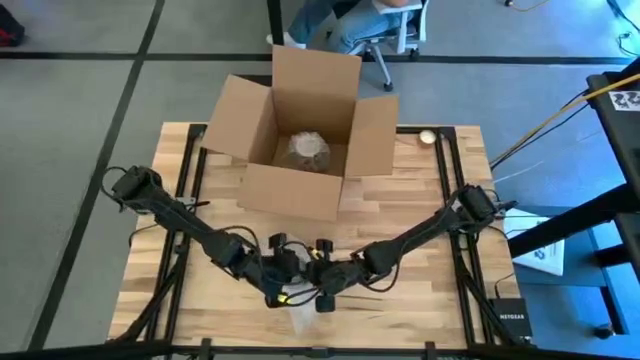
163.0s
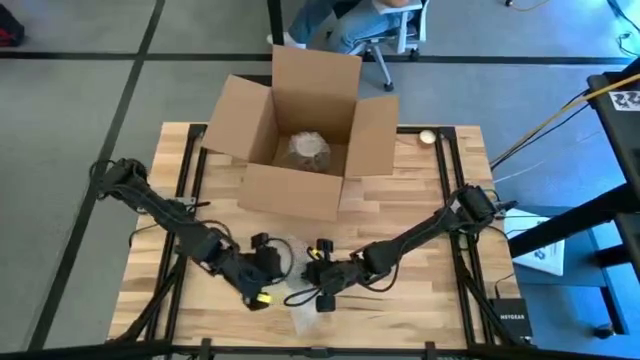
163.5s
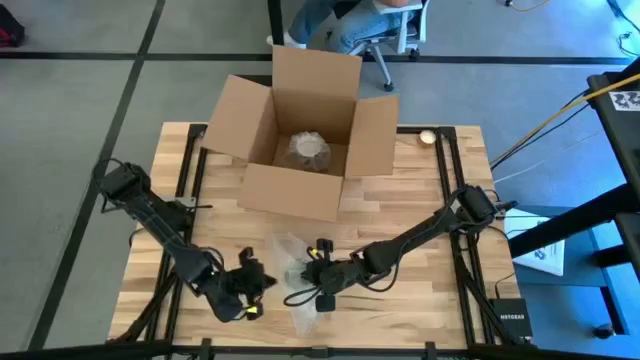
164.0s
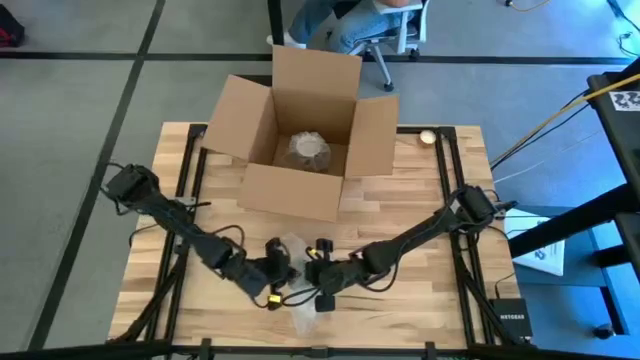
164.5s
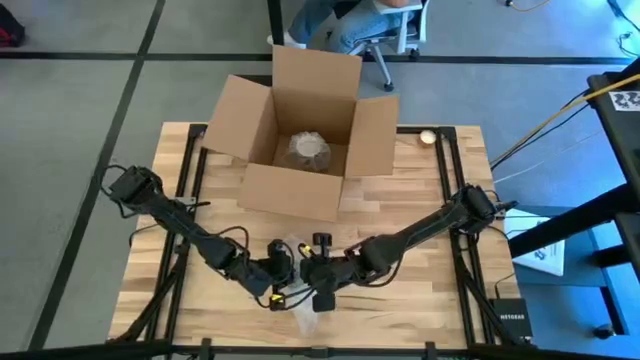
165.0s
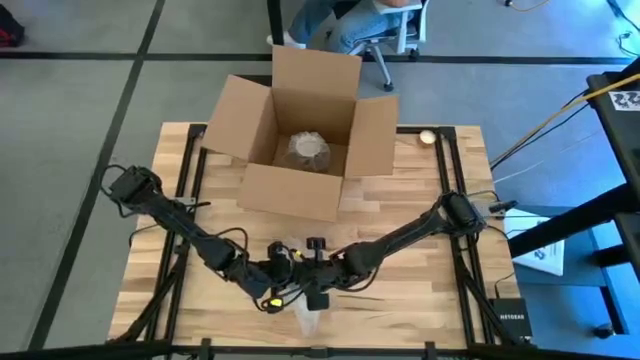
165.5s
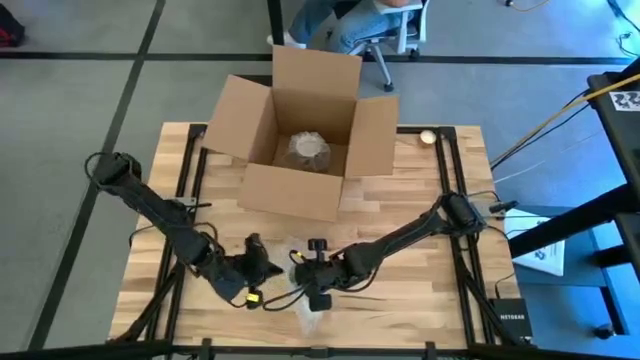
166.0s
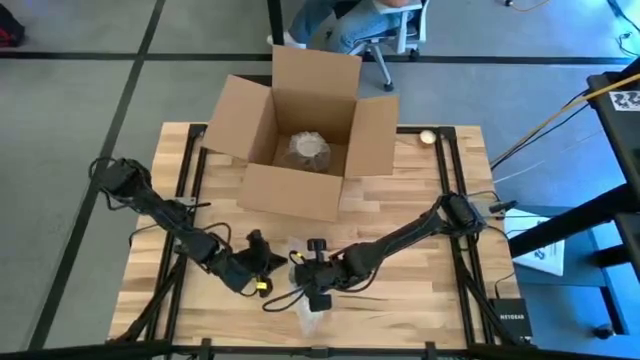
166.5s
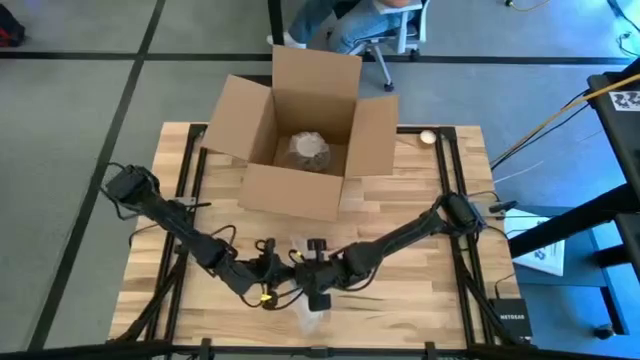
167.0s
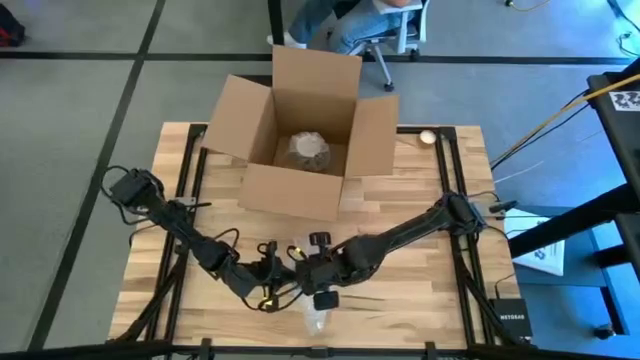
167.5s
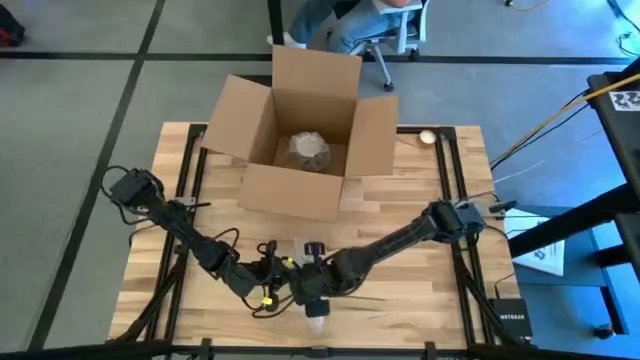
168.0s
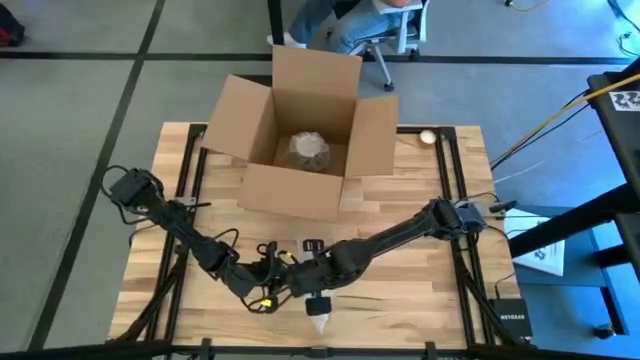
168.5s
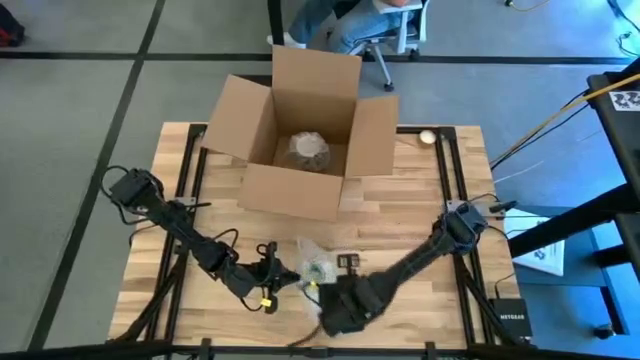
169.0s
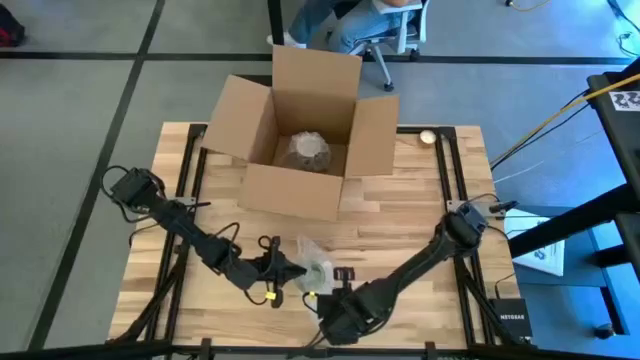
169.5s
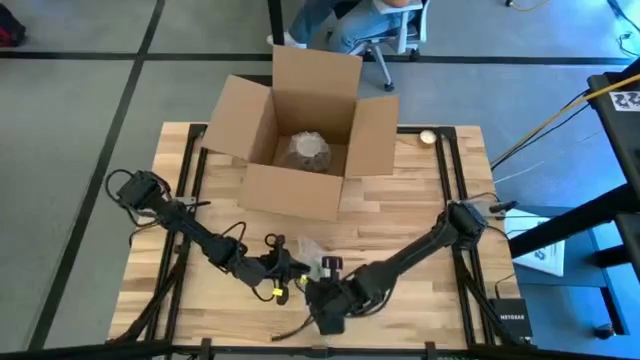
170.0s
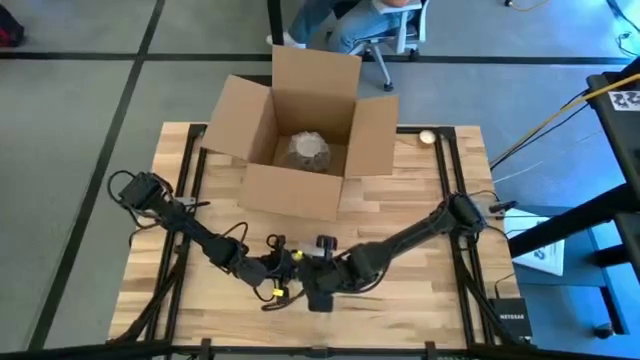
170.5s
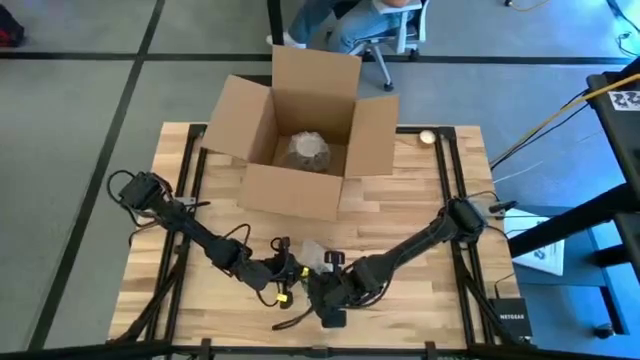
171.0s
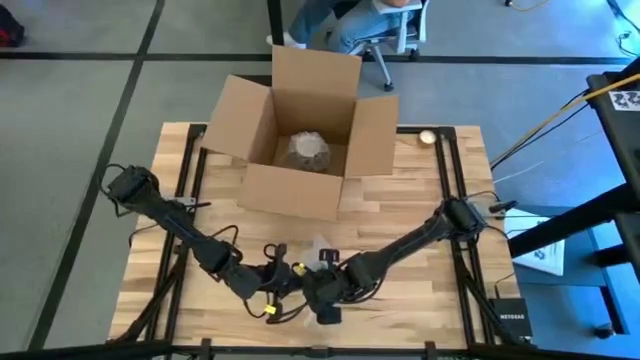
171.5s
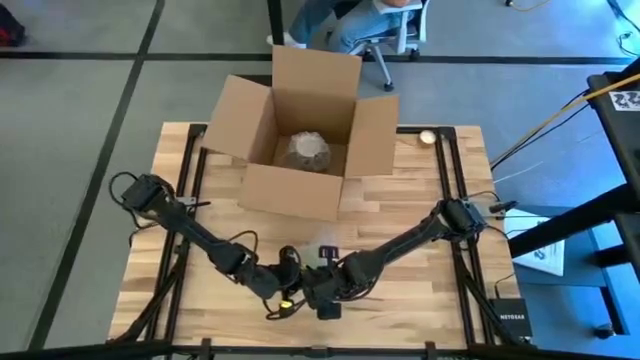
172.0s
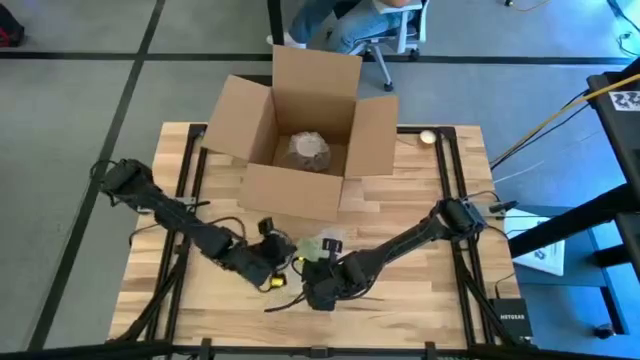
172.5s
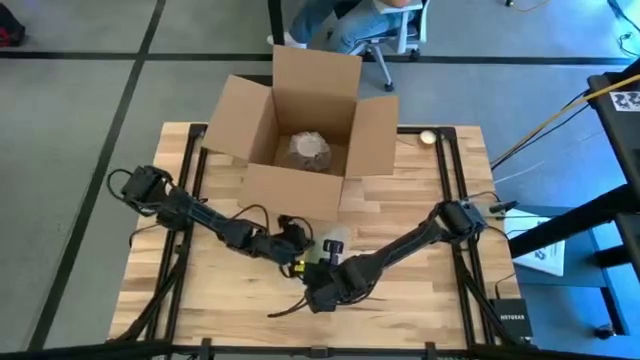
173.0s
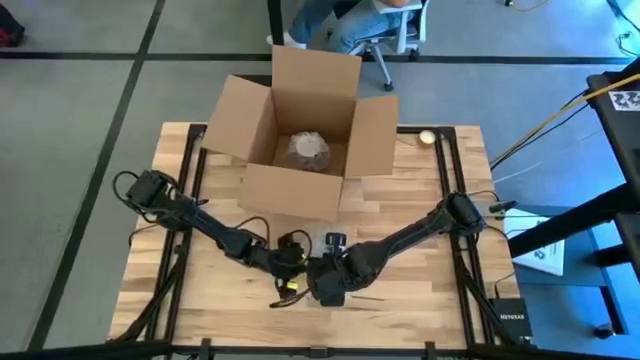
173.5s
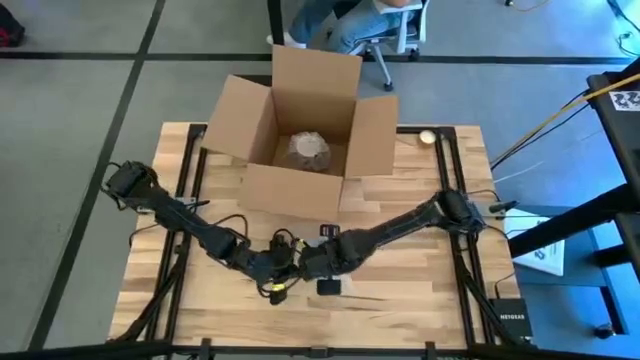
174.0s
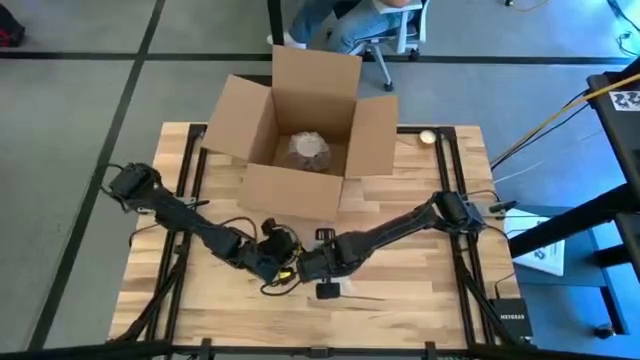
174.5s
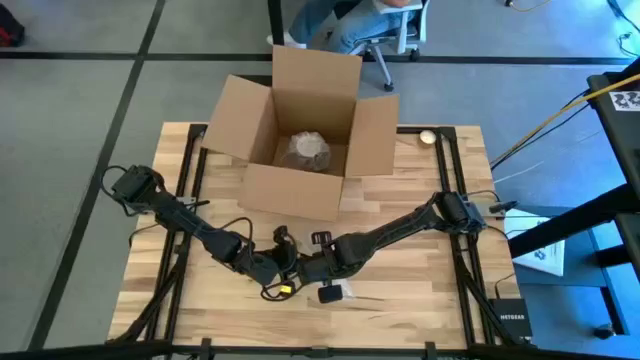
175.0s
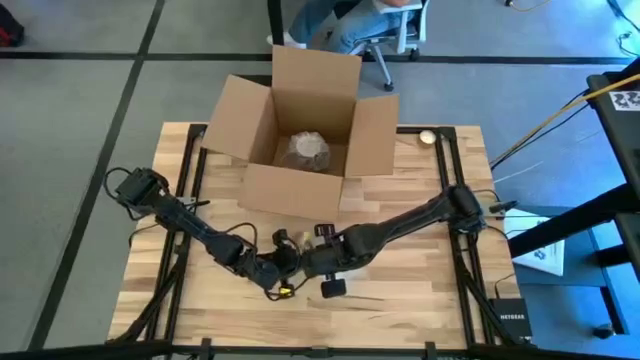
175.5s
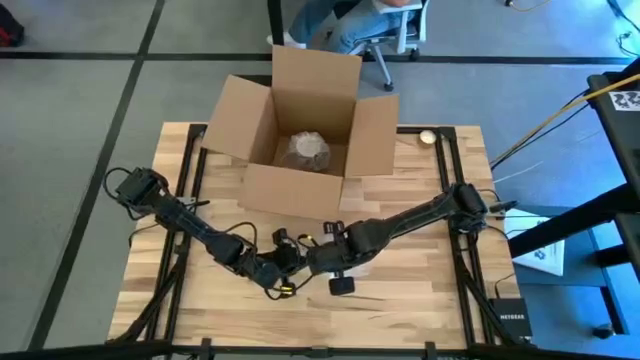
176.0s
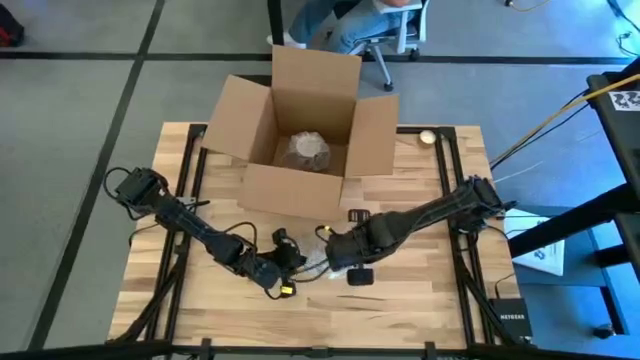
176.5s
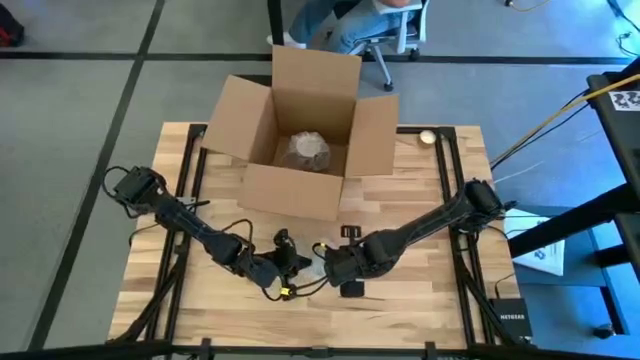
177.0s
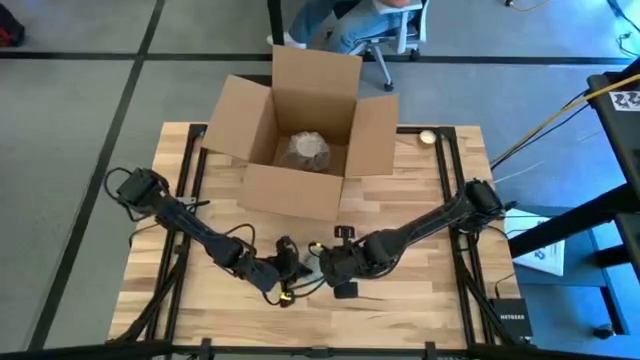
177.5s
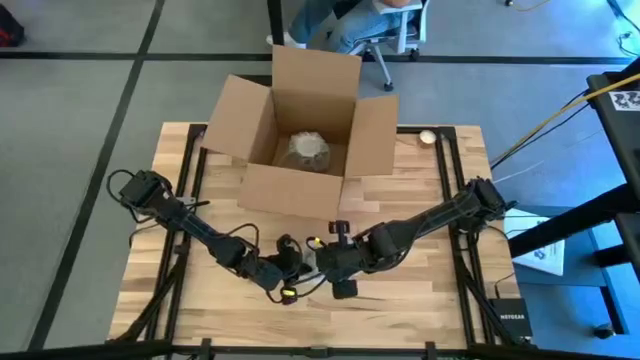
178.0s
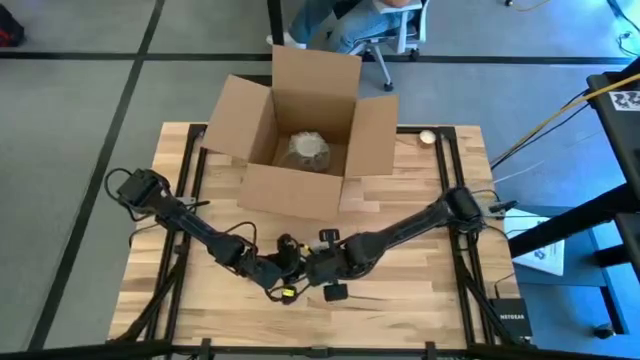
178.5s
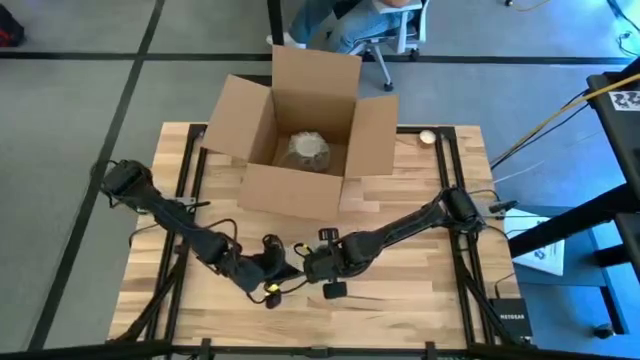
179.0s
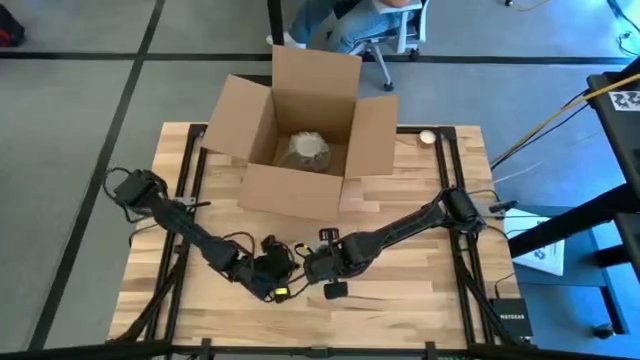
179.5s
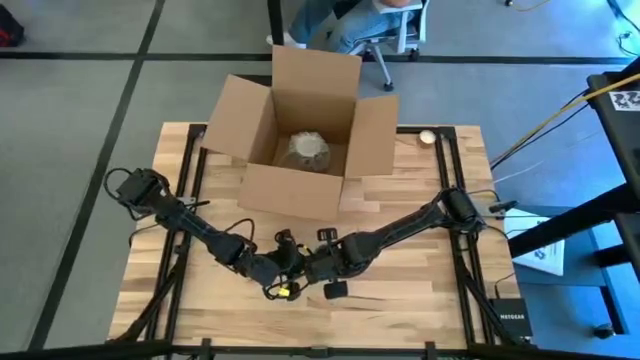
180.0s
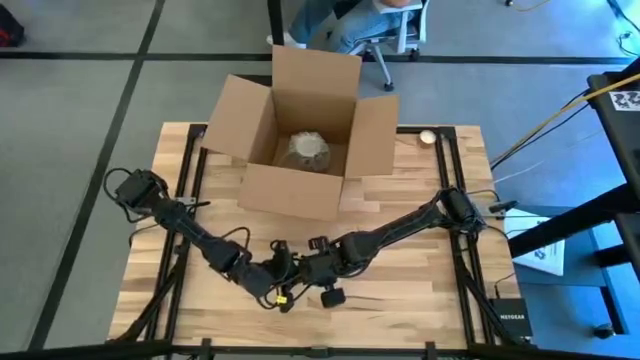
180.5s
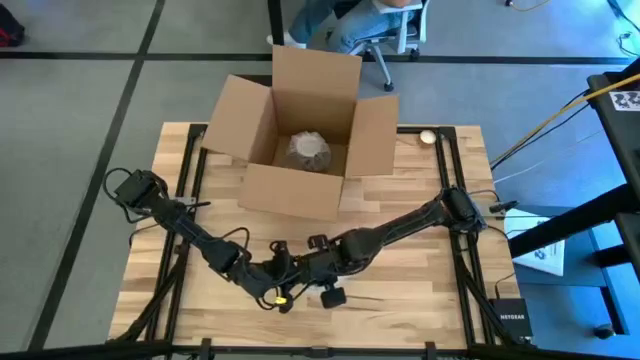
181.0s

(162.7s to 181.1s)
Task: wrap mug
Wrap the green mug with the transparent bubble wrap

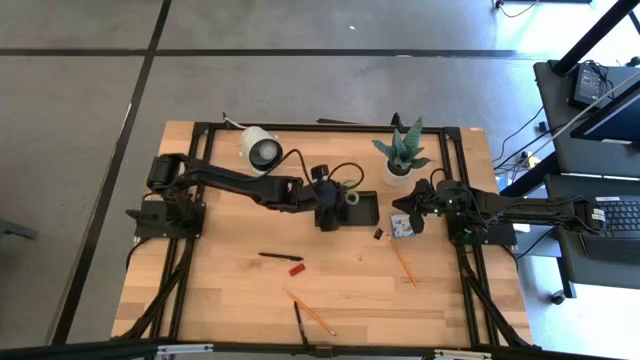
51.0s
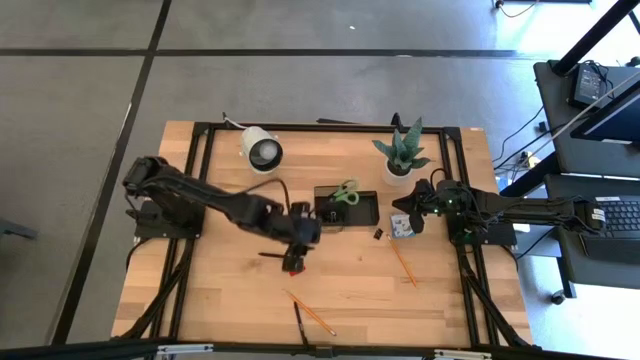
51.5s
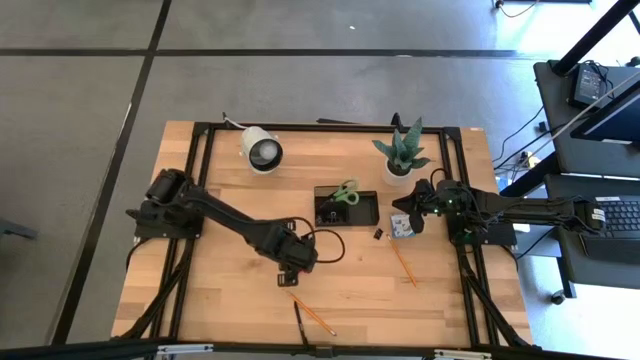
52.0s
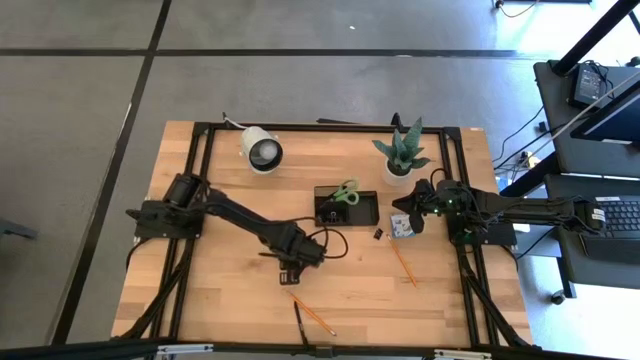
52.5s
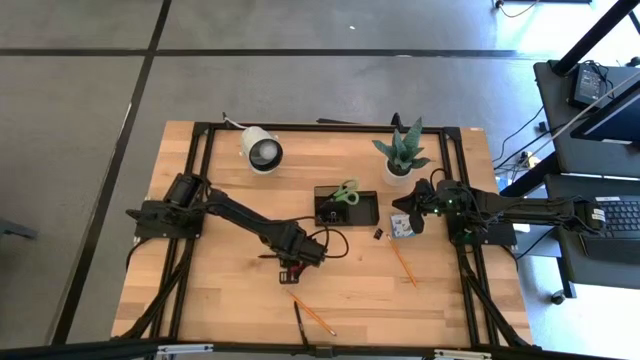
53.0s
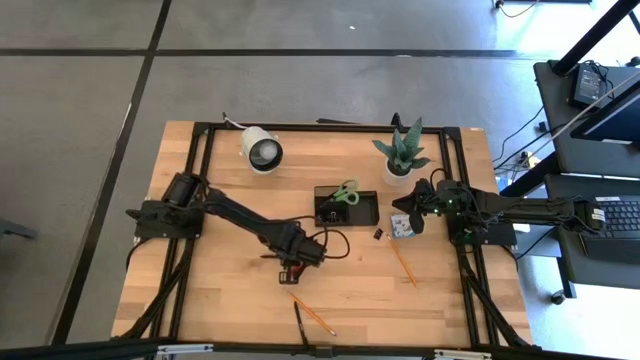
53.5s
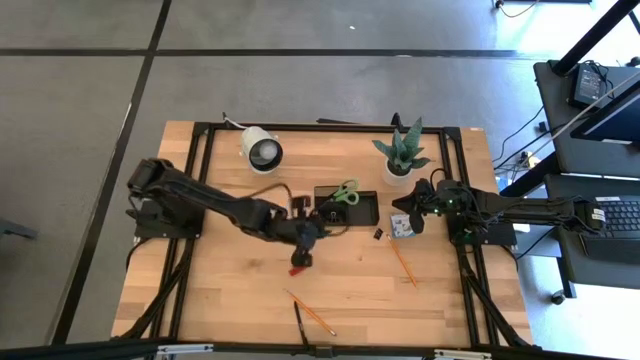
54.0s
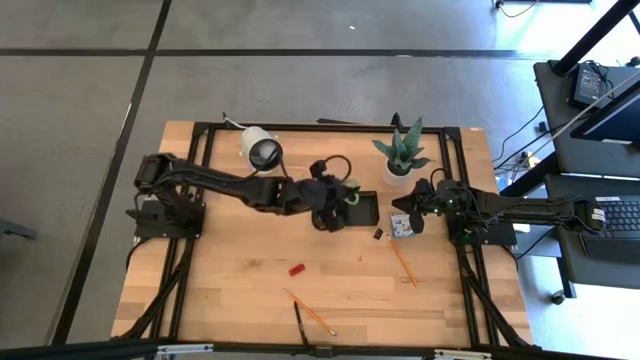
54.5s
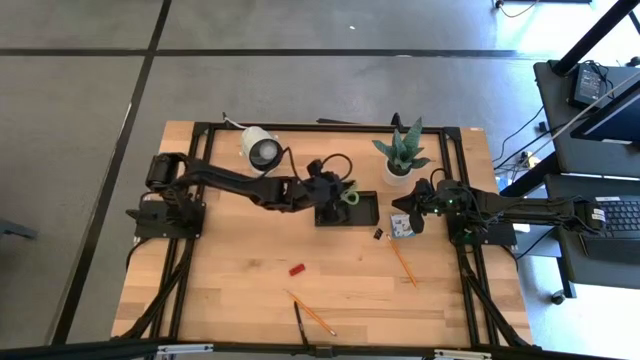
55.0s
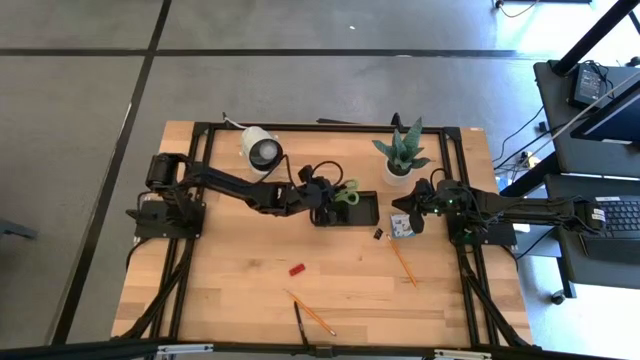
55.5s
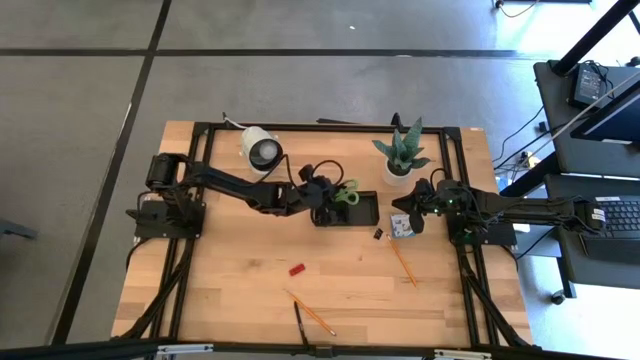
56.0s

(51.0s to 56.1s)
Task: Pick and place office supplies into organizer
Put the top black pen in the desk organizer
